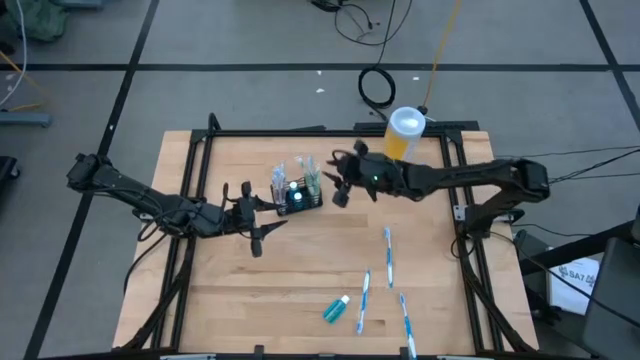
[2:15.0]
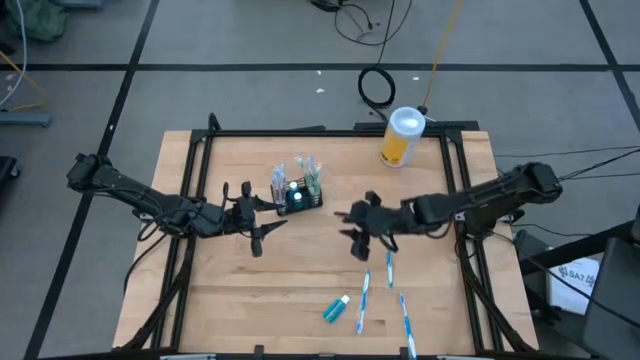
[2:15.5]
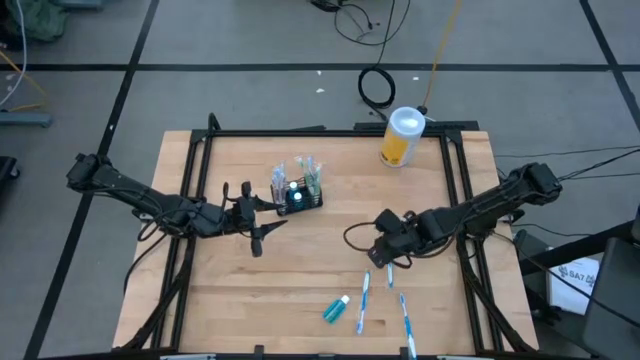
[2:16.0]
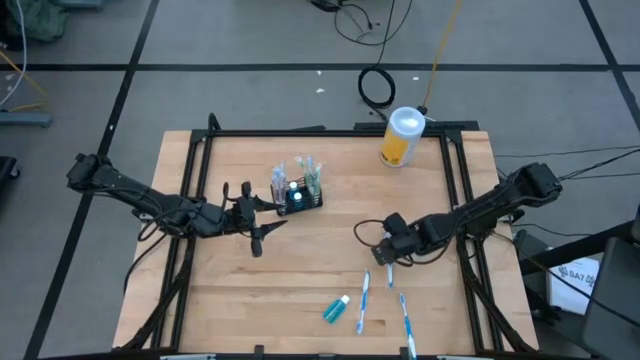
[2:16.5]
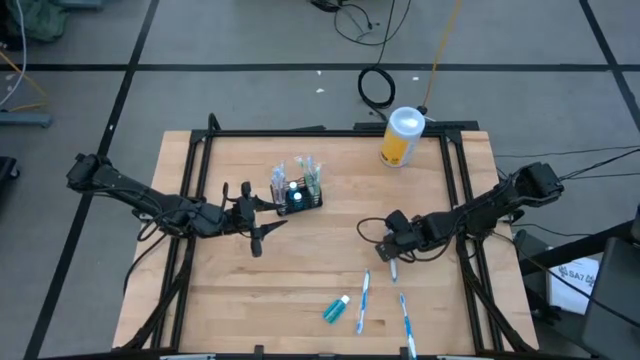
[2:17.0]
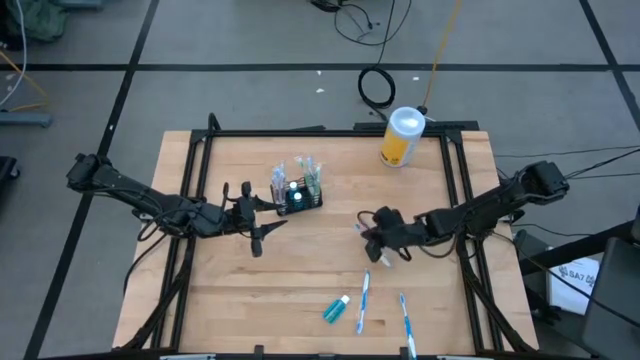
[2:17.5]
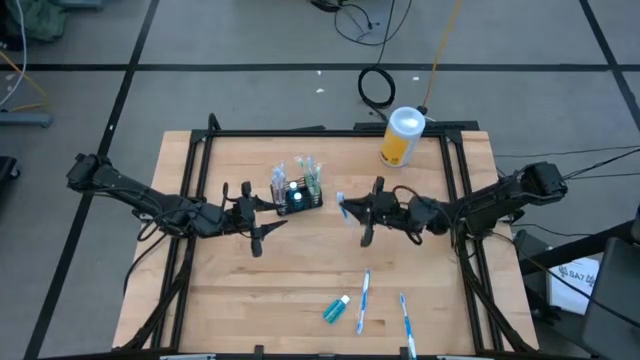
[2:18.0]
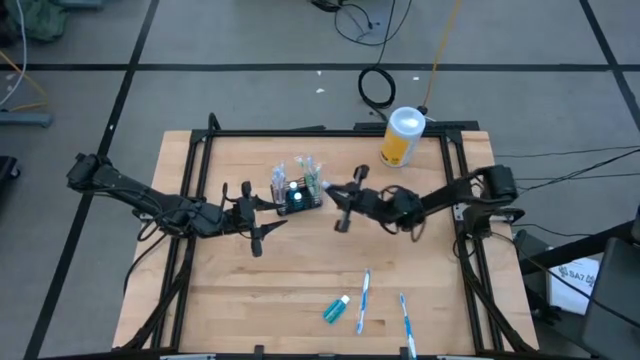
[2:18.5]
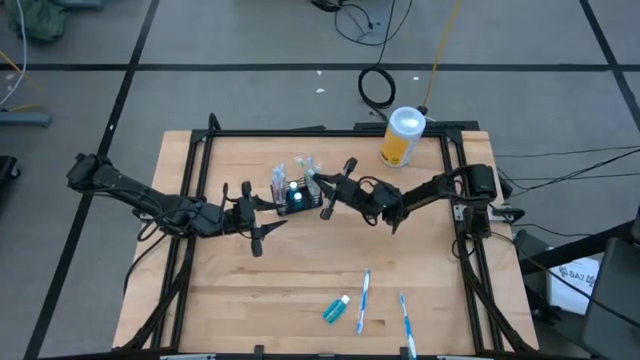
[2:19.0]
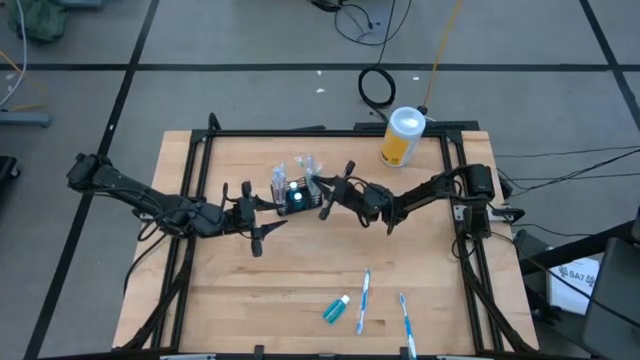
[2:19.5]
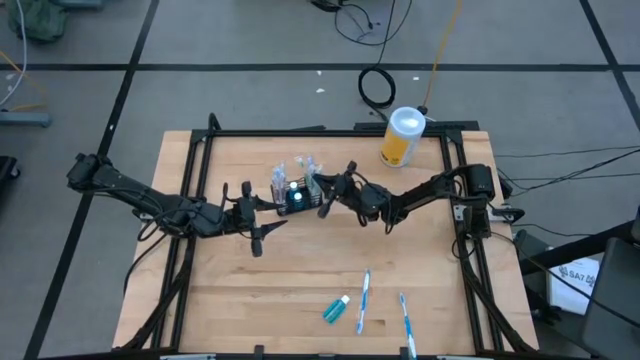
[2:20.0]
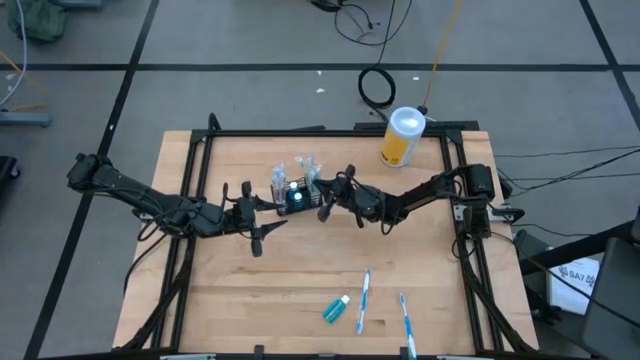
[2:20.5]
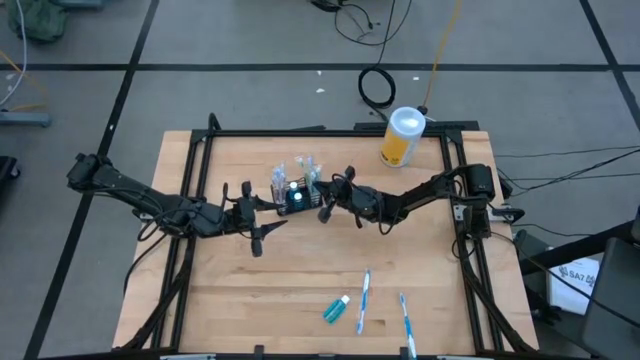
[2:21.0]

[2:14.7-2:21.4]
Task: Pick & Place toothbrushing station
Put the blue toothbrush into the black mesh organizer

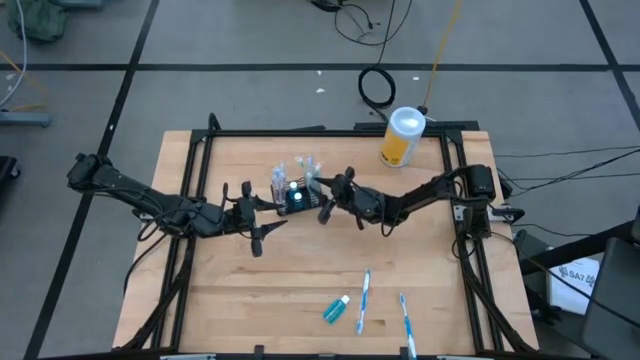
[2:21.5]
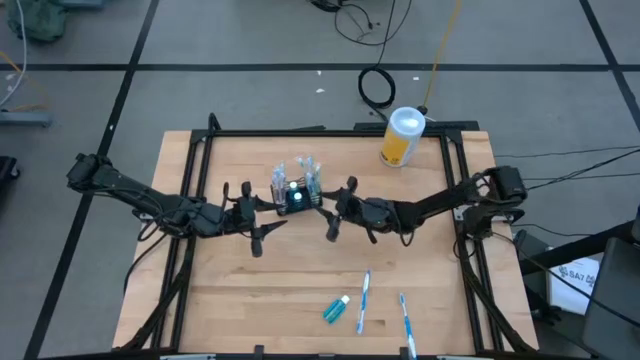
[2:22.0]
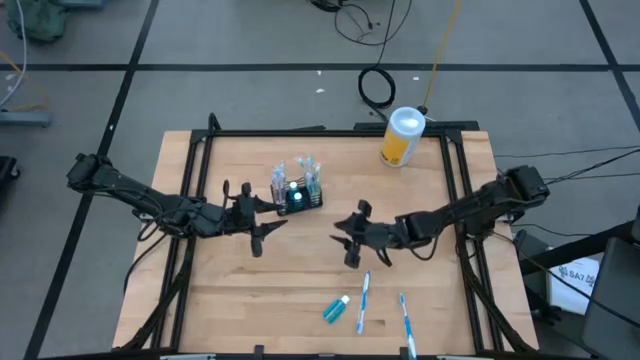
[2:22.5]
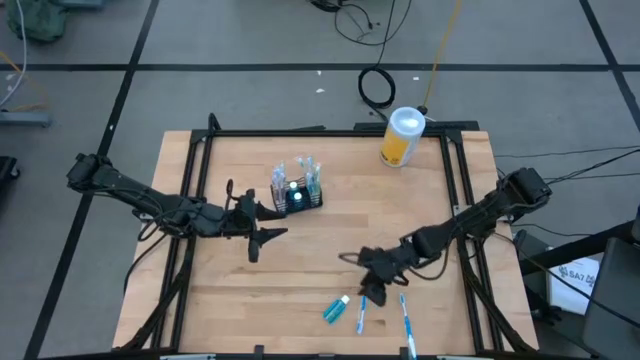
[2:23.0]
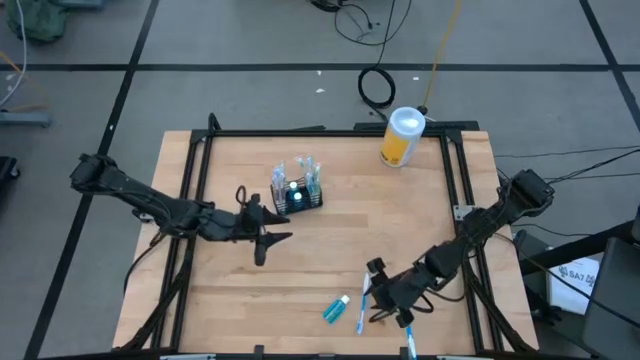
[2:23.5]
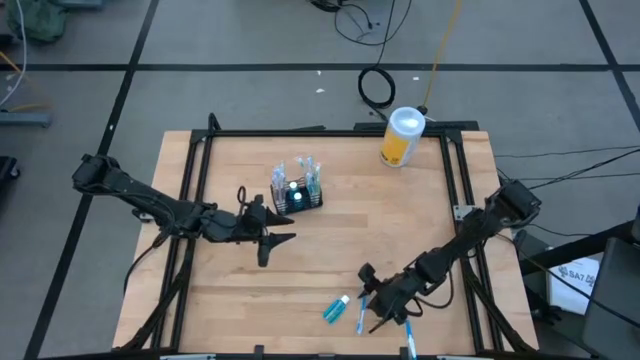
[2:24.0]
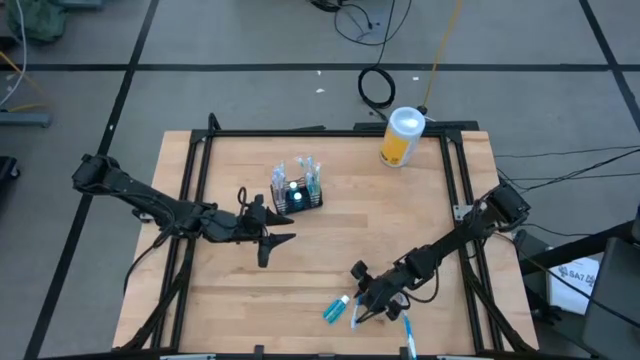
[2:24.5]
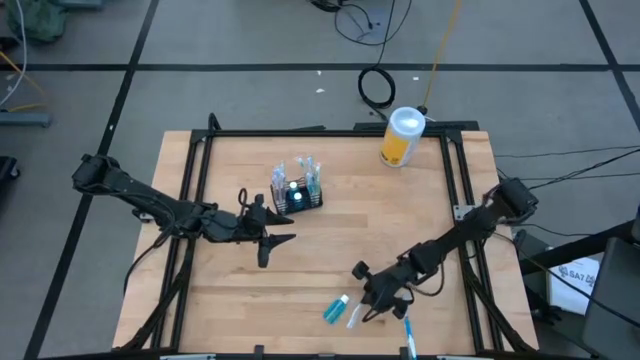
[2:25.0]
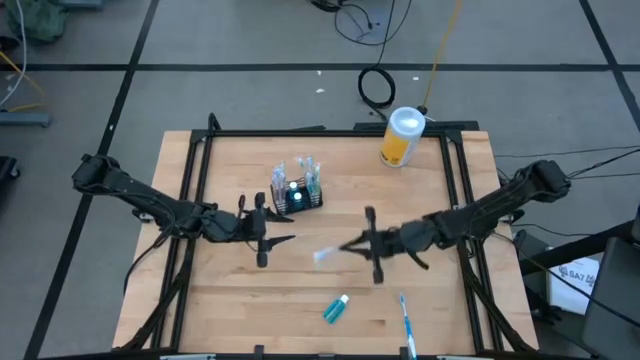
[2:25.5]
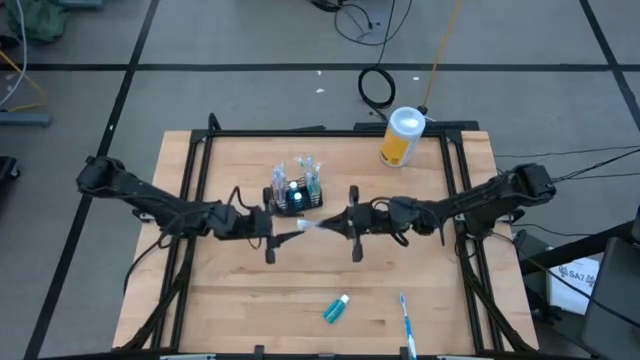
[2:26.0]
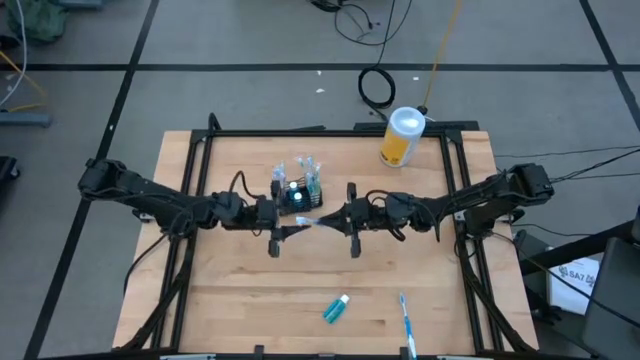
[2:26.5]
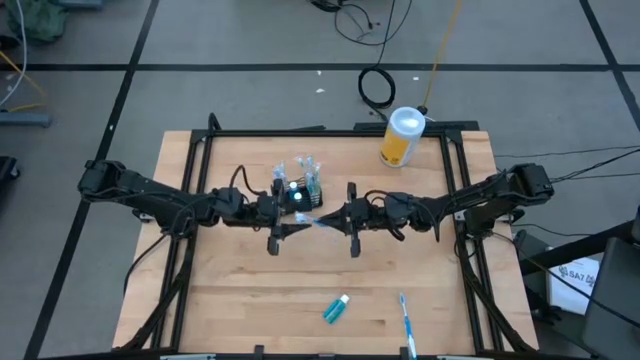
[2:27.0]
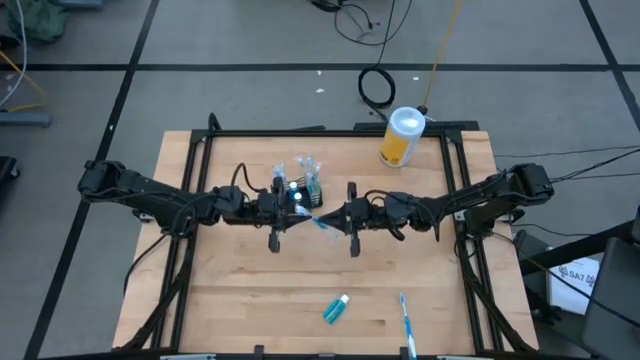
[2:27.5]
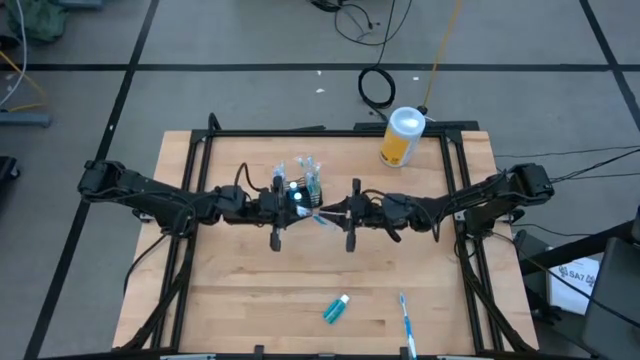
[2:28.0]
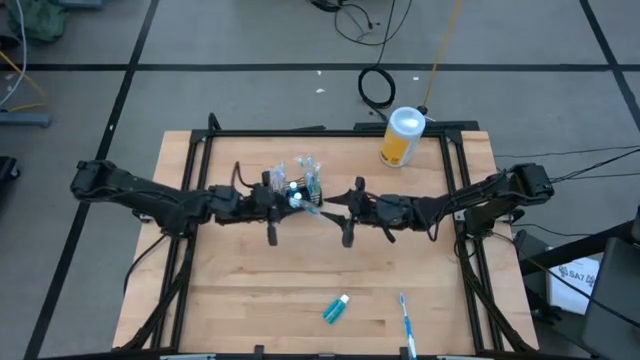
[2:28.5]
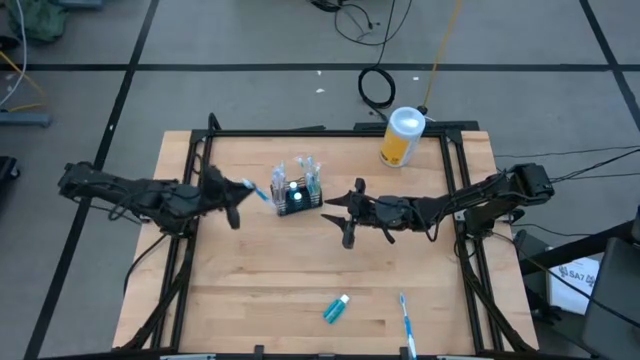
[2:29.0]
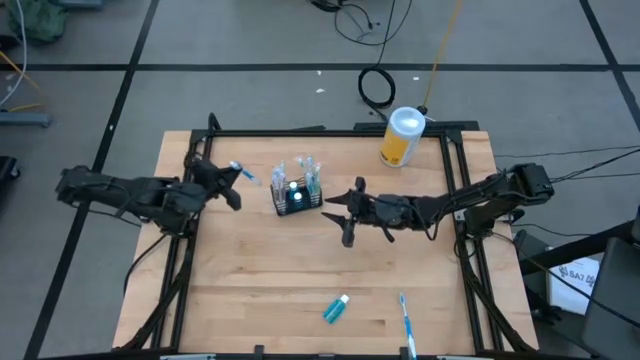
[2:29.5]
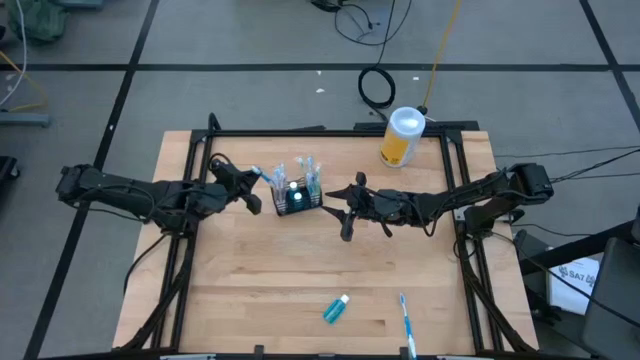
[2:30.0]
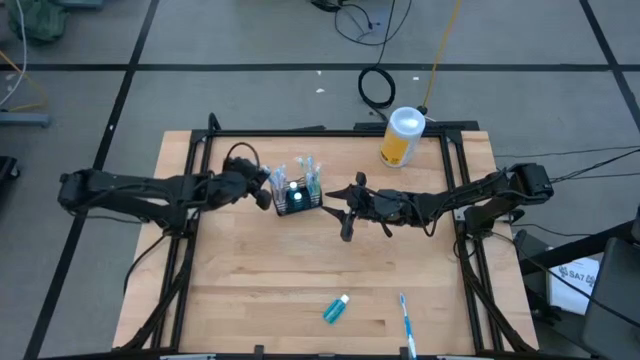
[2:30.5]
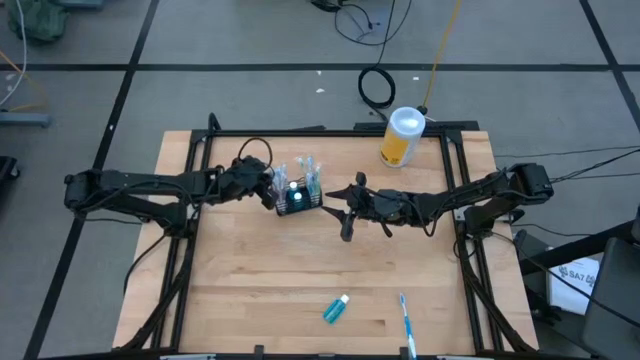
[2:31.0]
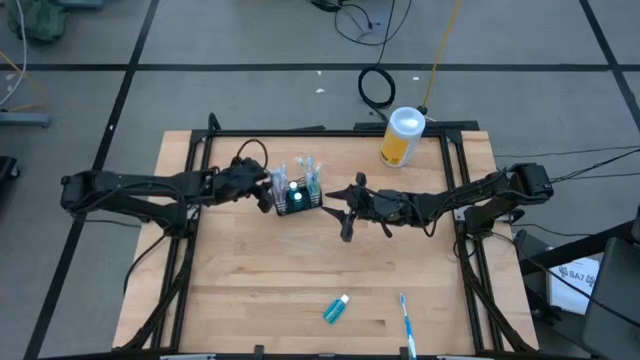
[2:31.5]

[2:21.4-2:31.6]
Put the blue toothbrush into the black mesh organizer

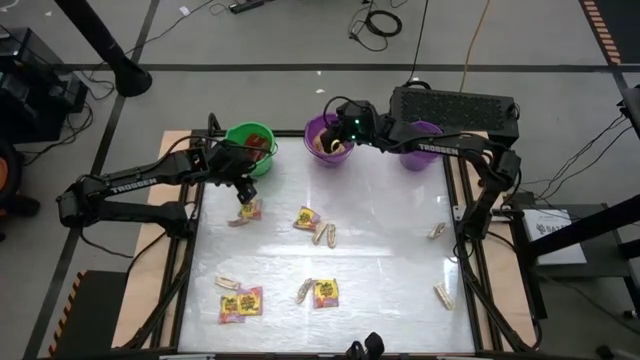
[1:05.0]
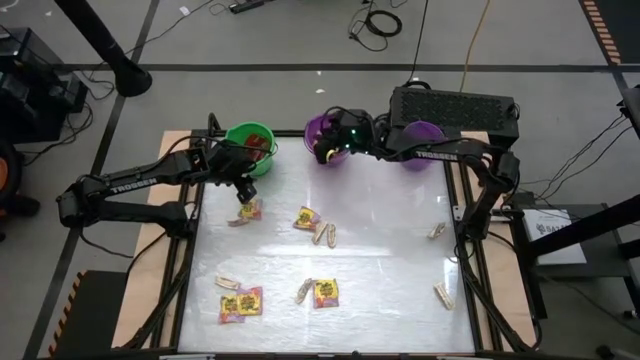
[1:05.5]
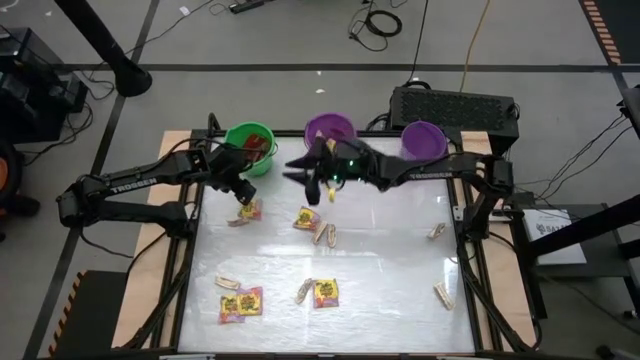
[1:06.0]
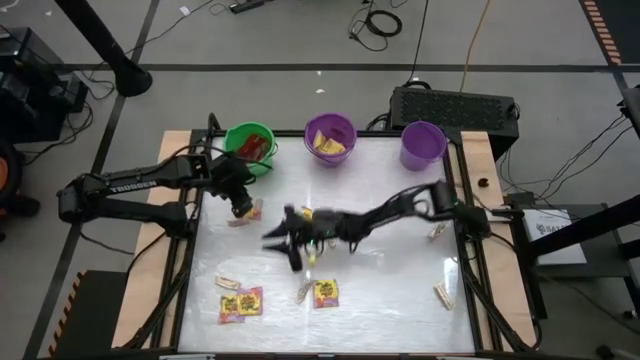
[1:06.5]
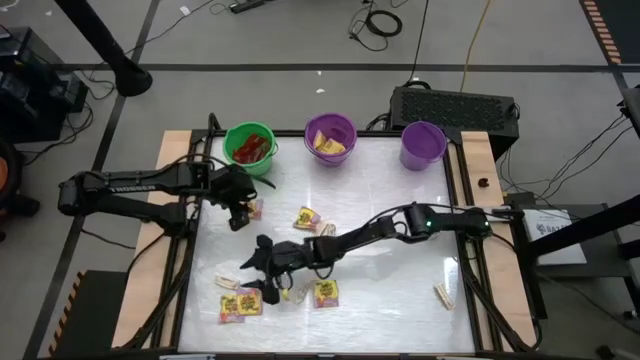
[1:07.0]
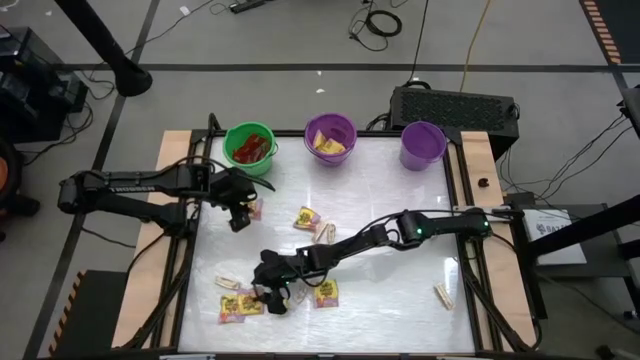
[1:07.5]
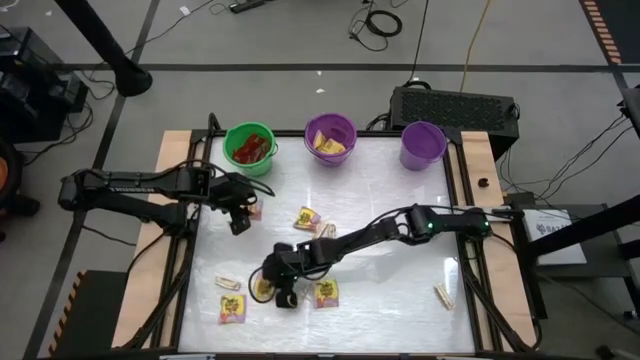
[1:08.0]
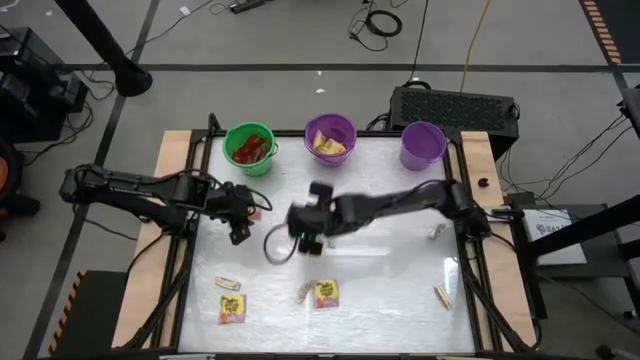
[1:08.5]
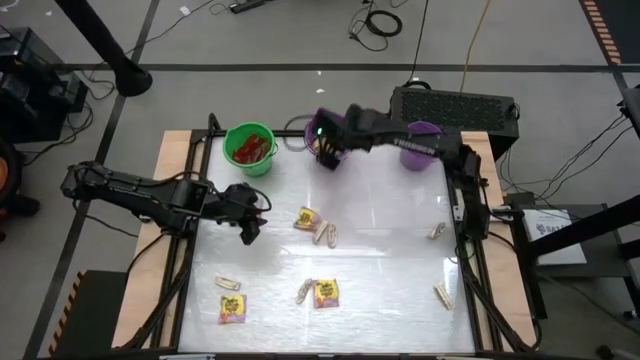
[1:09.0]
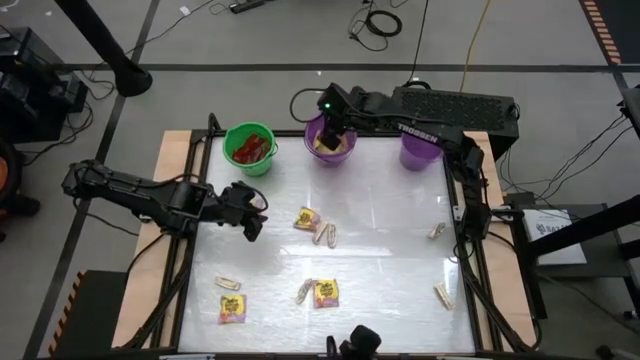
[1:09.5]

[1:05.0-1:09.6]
Task: Sort candy by brand, put in halloween buckets
Put the yellow candy pack in the left purple bucket
